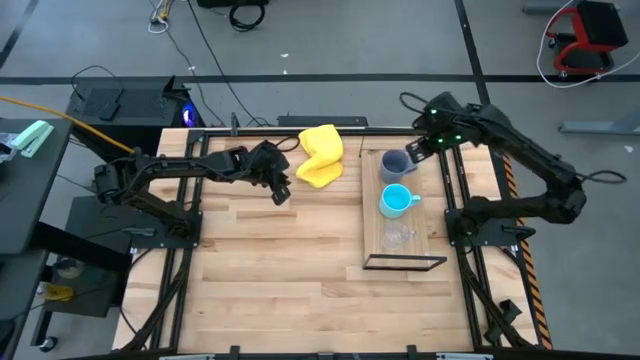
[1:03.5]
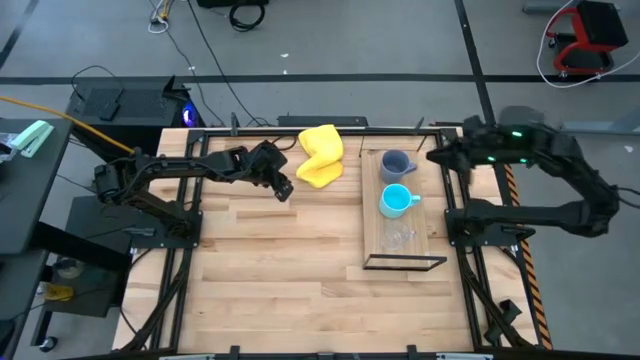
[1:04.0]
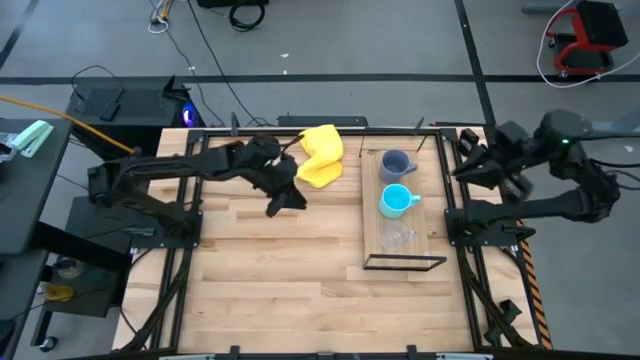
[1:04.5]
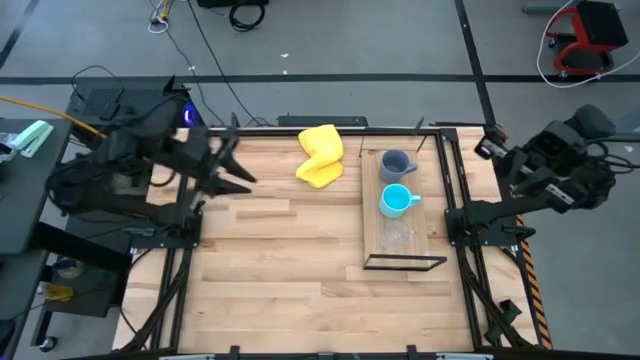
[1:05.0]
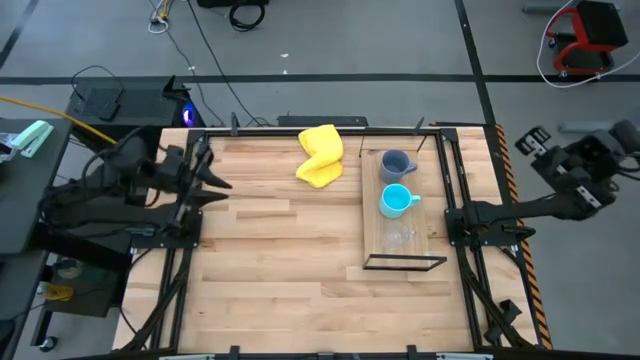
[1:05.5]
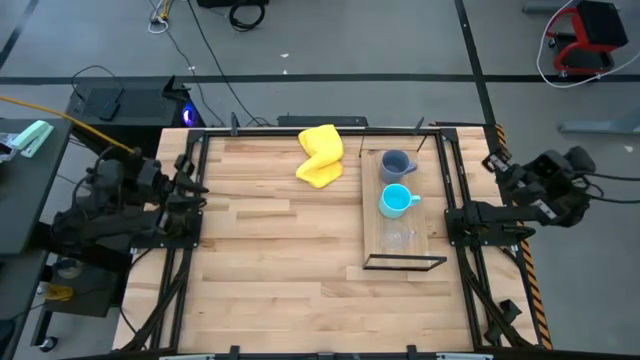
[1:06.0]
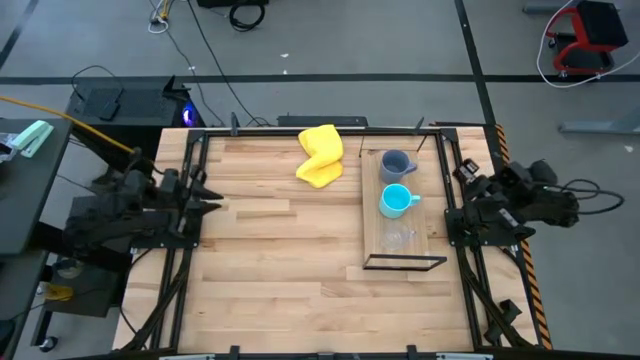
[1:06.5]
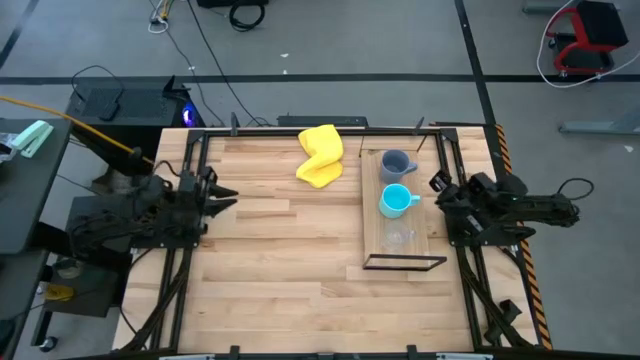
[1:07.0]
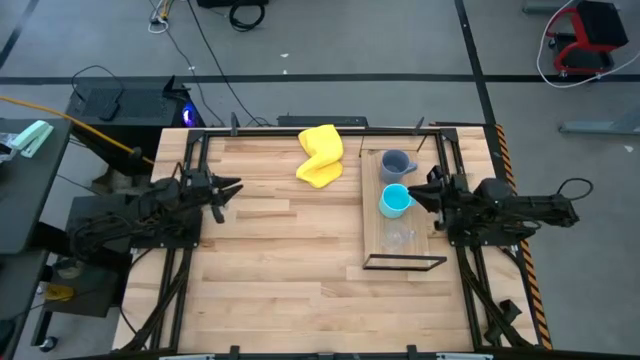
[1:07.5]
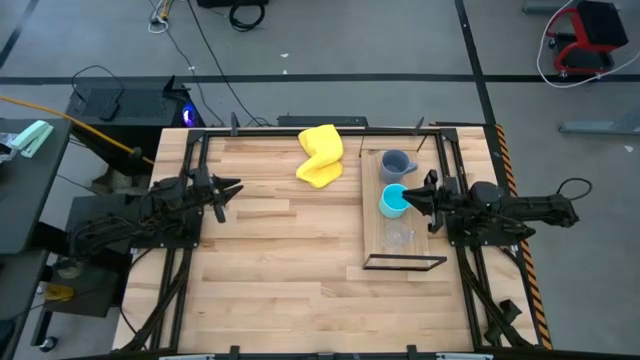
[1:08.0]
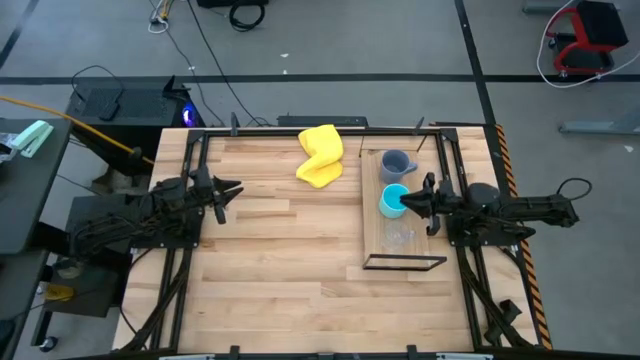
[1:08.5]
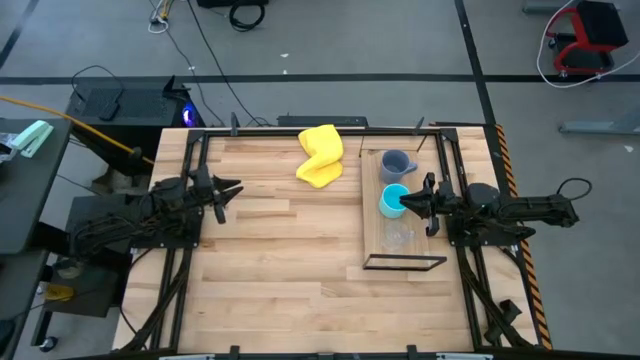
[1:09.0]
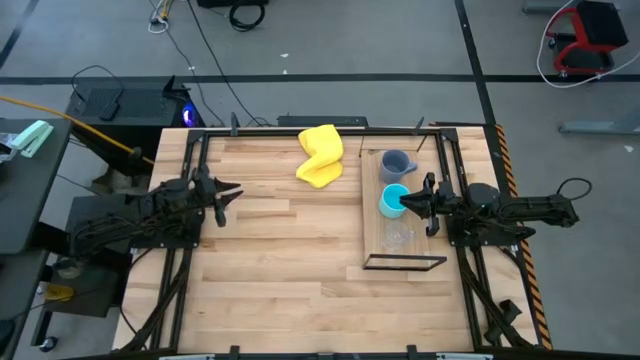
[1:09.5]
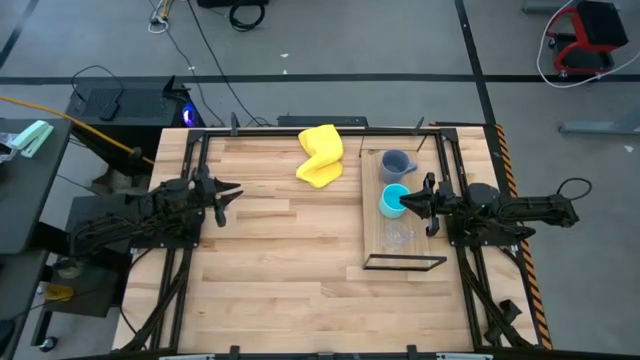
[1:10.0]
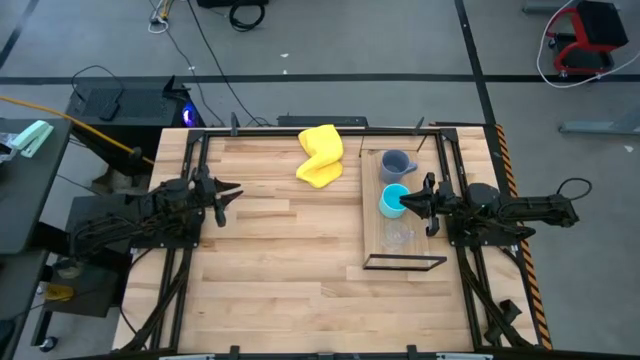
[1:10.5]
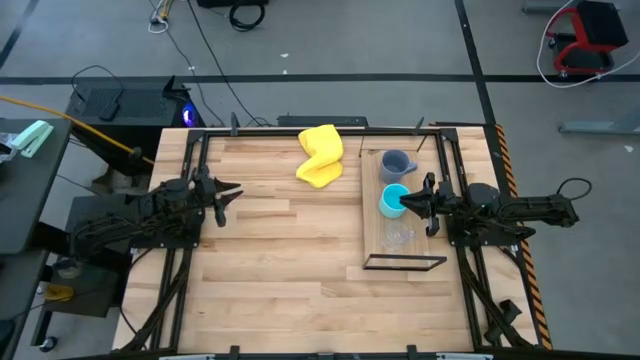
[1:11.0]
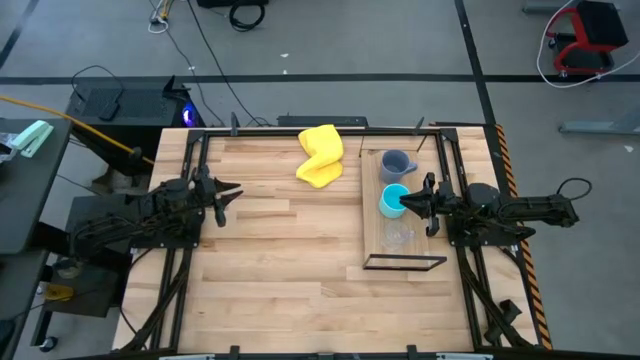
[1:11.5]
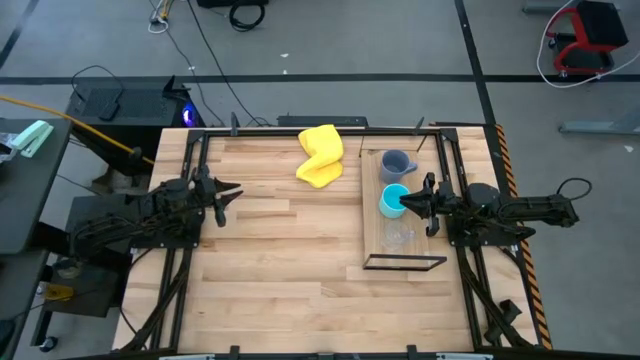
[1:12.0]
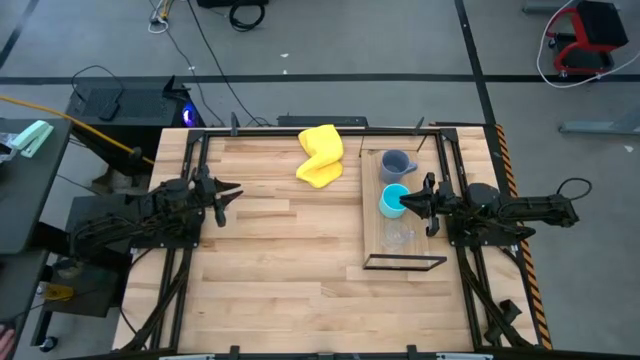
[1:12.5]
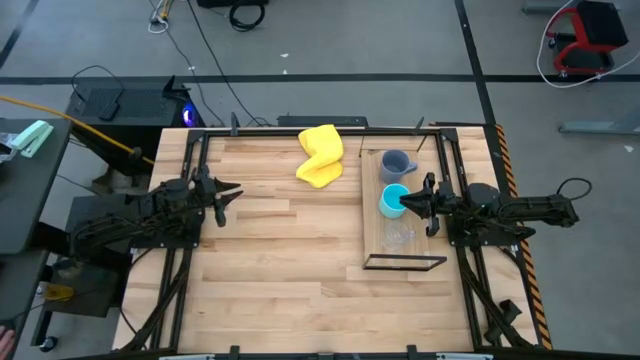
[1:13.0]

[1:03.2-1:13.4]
Task: Stack small to large cups/mugs on shelf
Return to Home Position

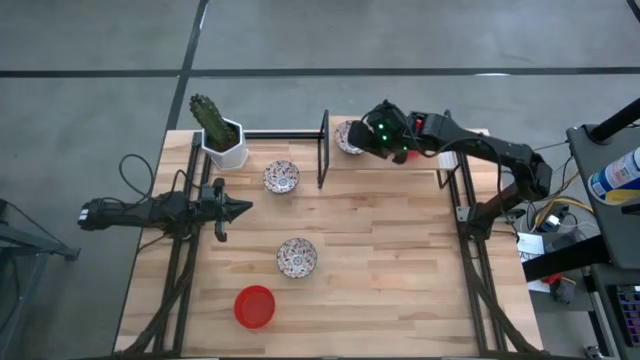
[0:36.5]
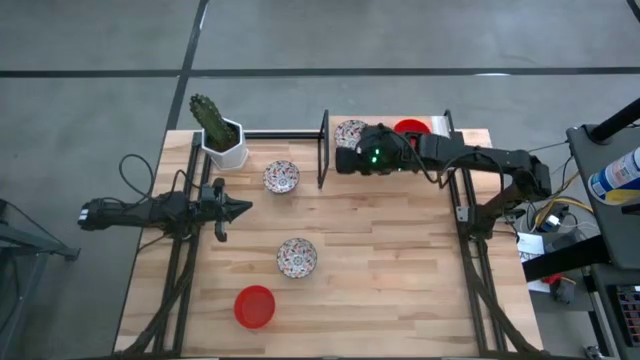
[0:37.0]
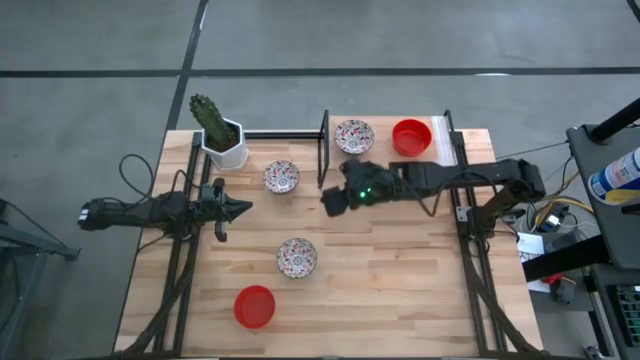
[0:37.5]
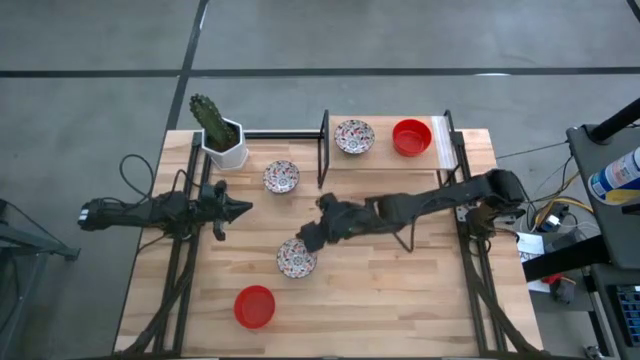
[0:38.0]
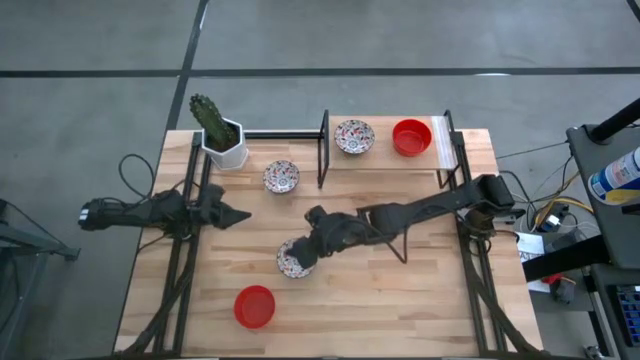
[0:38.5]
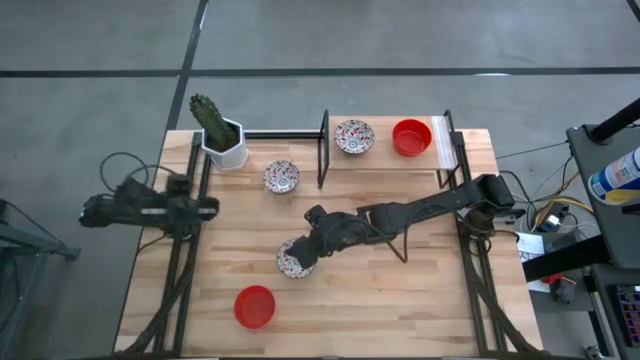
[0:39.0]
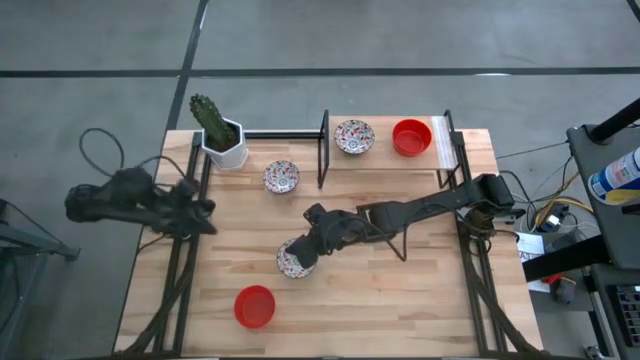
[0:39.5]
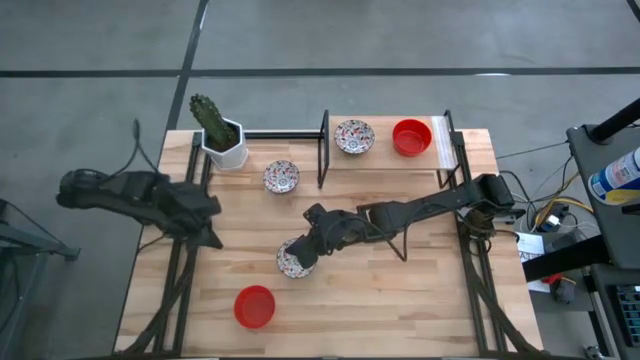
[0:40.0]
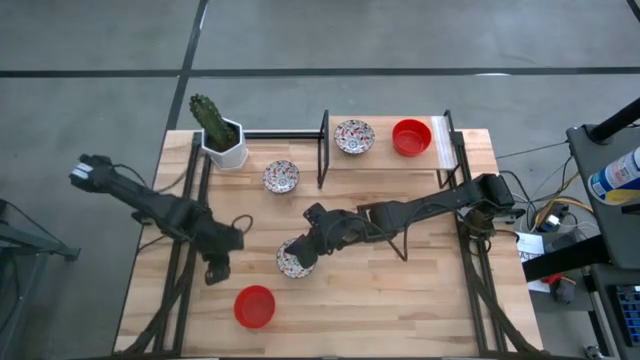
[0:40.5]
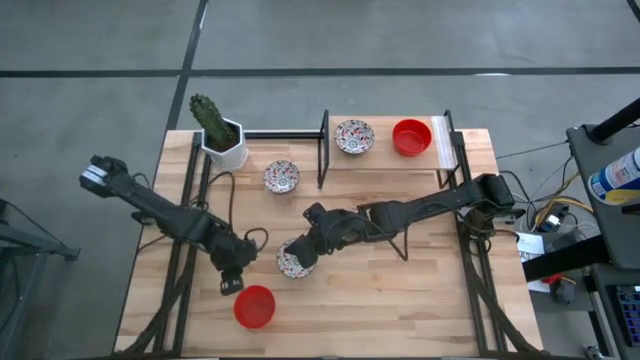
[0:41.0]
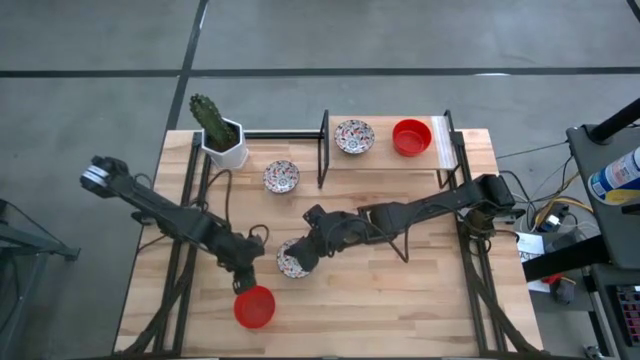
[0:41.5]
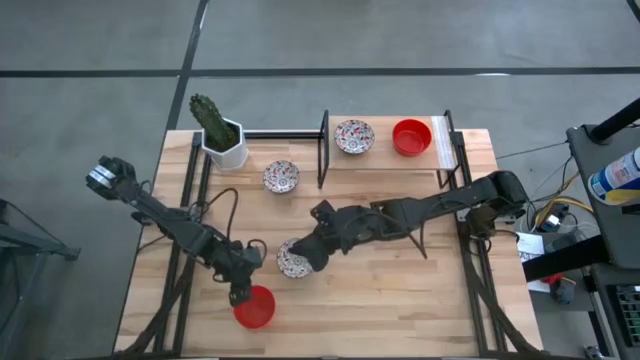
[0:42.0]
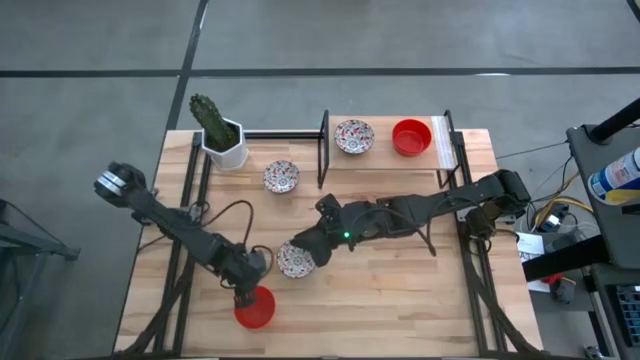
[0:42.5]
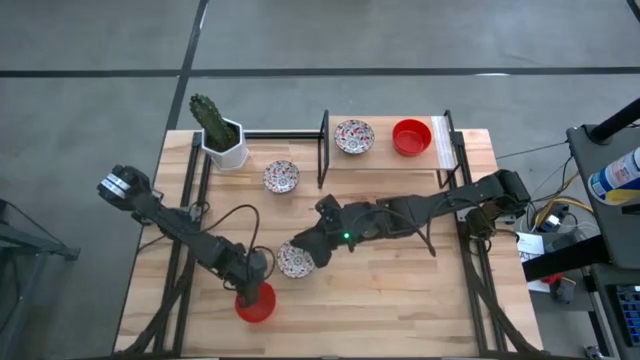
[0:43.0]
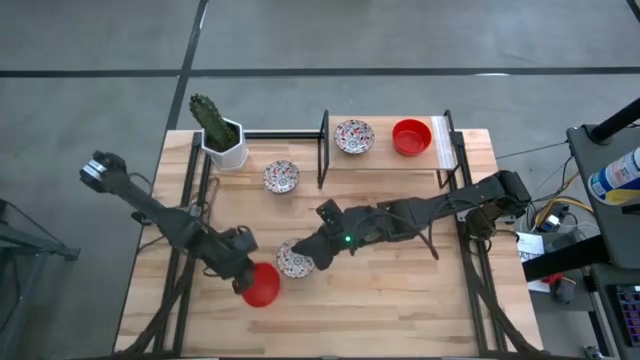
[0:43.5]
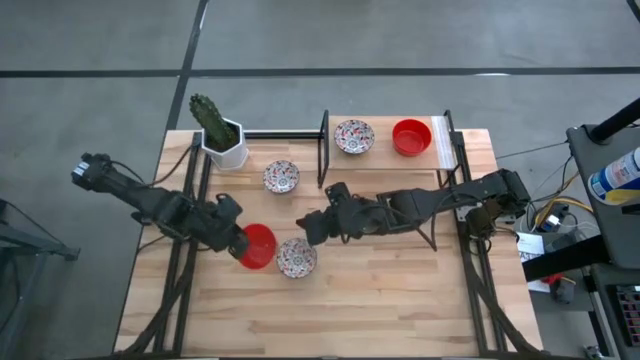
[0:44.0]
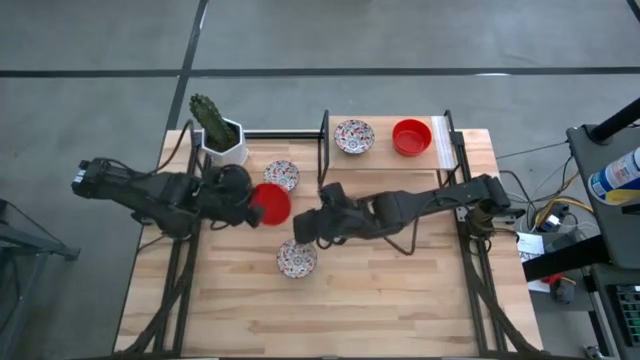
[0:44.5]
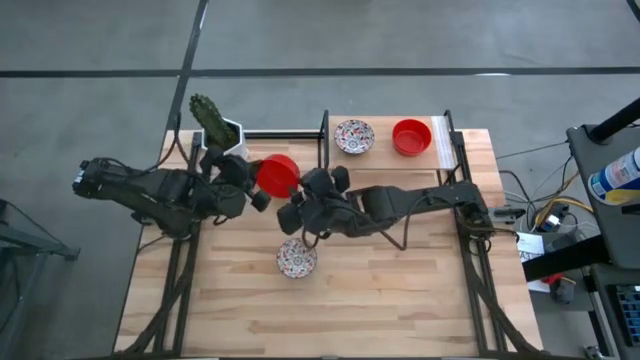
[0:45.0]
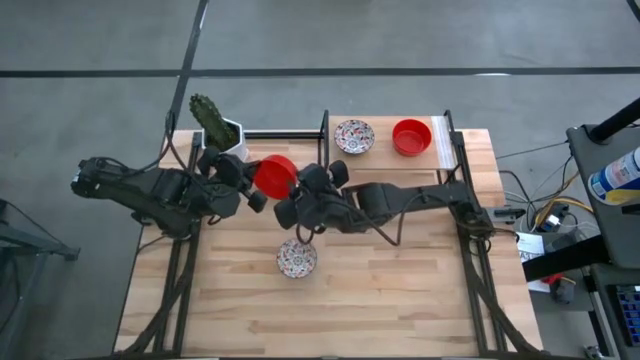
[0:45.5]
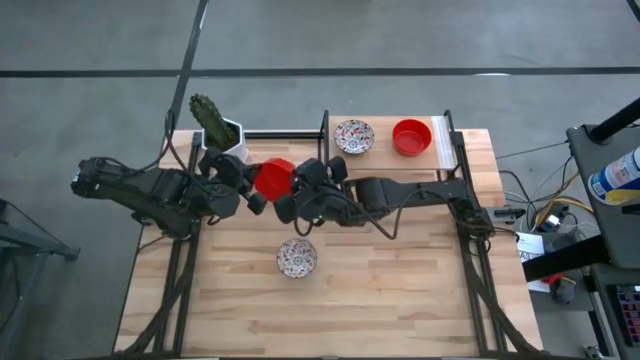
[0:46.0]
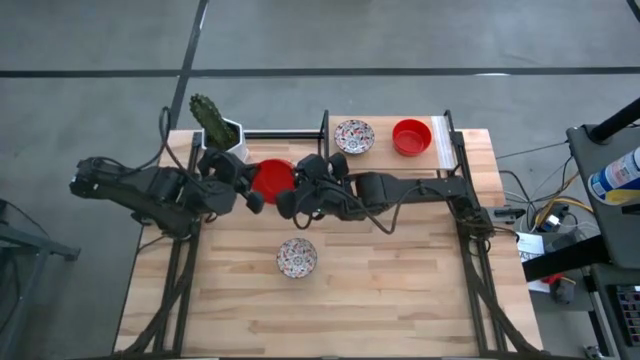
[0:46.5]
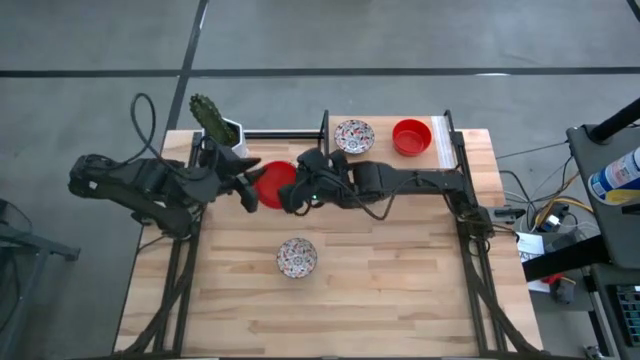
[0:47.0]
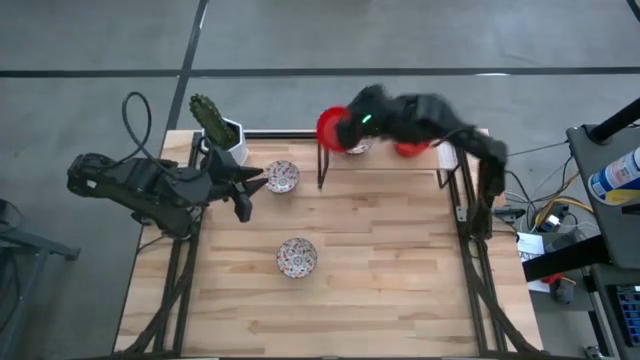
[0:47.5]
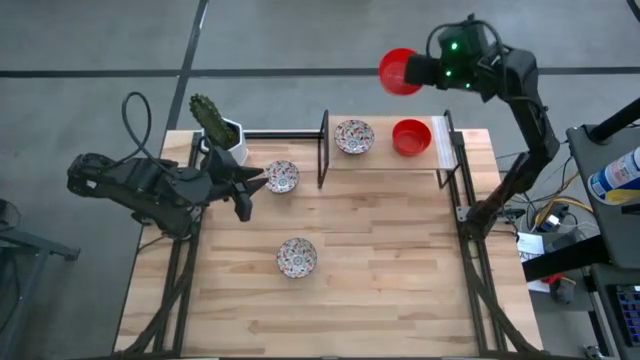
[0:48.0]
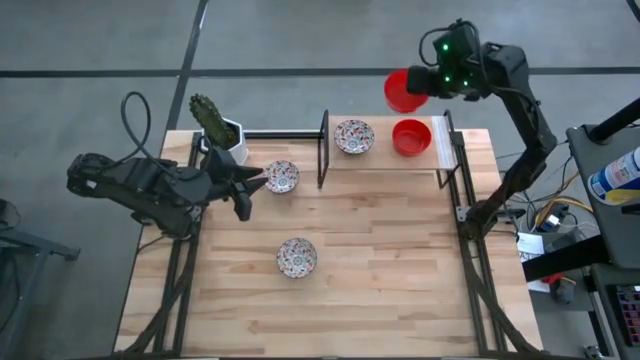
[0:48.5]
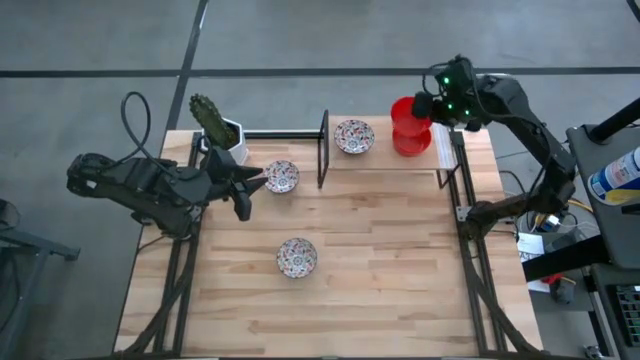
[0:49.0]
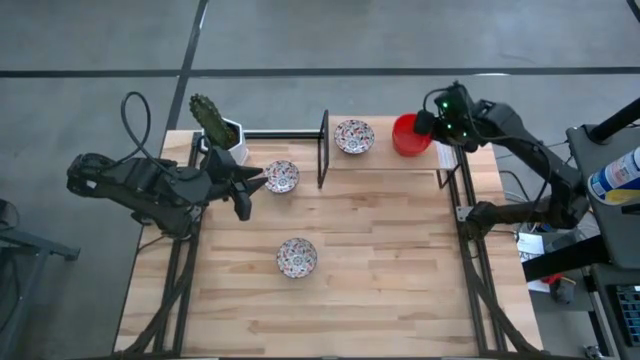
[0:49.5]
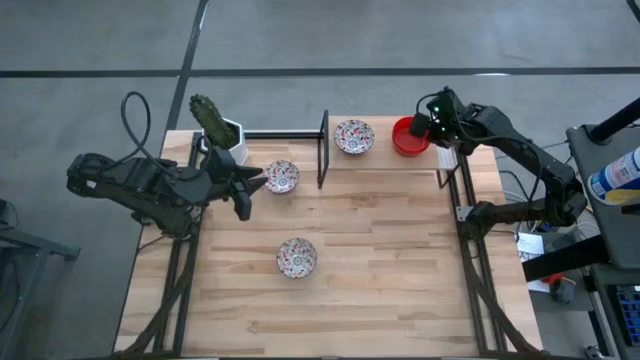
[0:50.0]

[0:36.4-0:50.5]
Task: Pick & Place Mini bowls
Stack the red bowl on top of the other red bowls on the shelf
